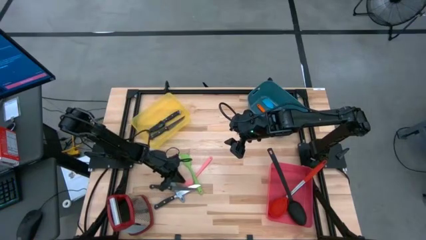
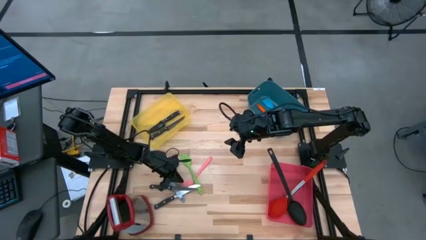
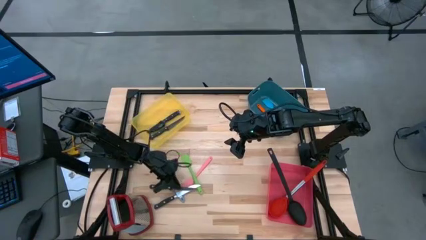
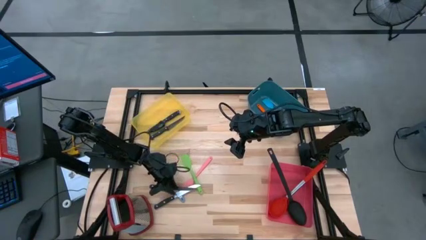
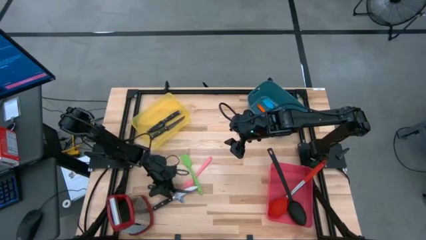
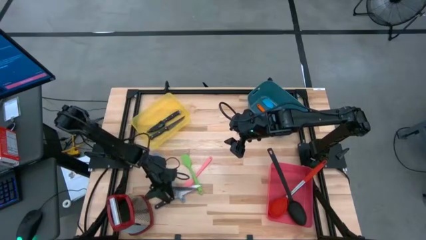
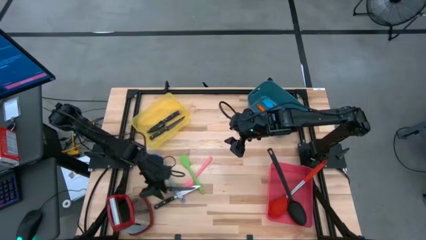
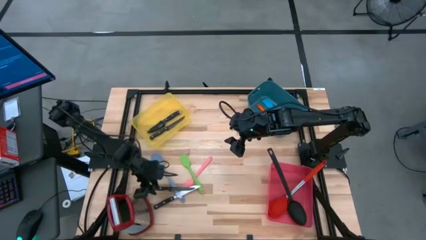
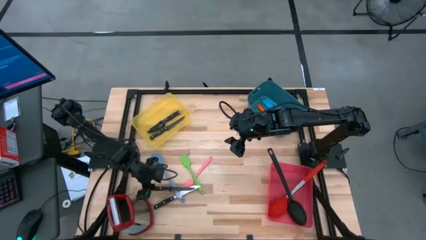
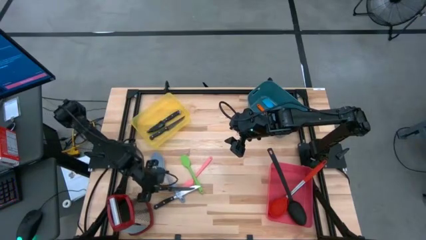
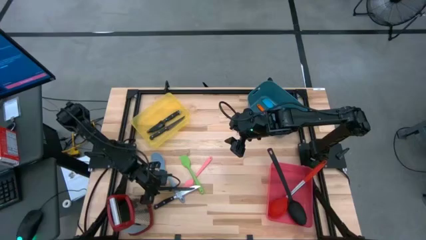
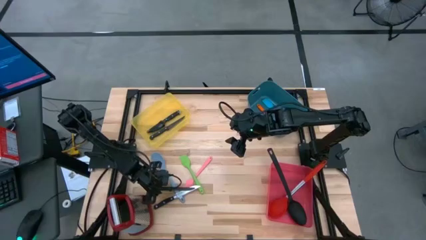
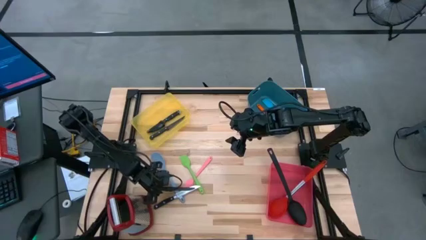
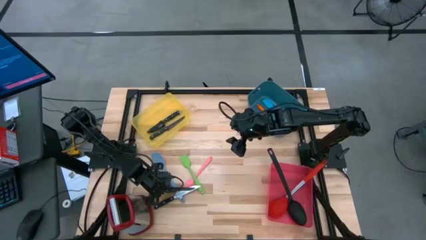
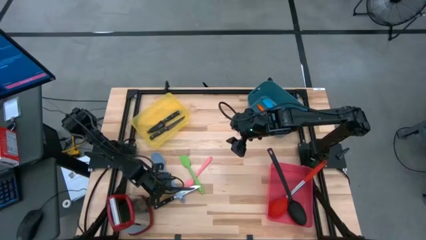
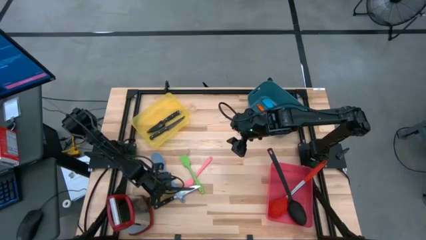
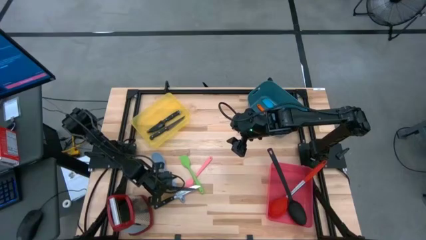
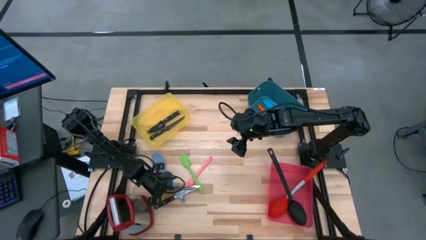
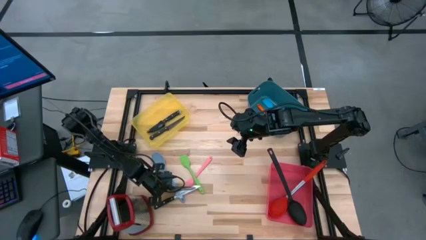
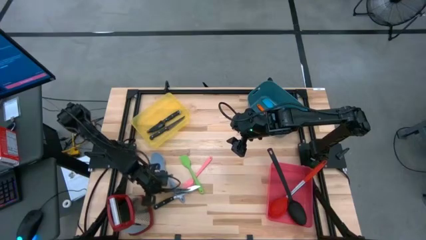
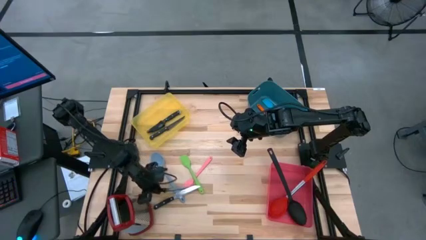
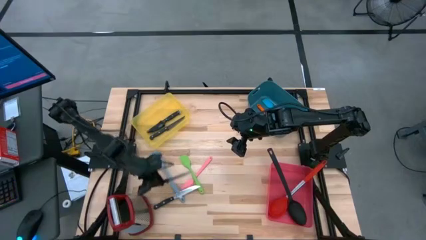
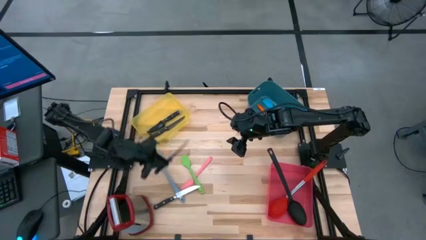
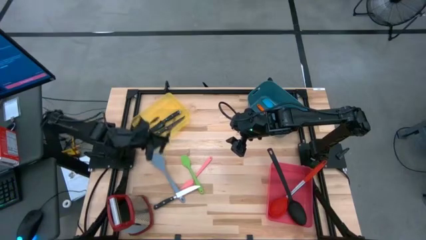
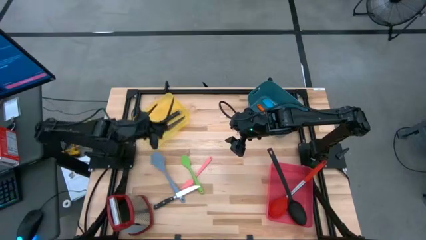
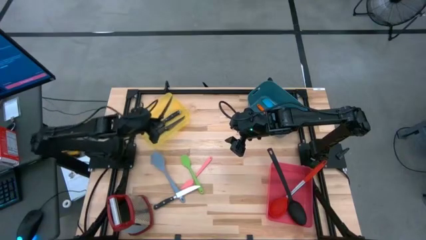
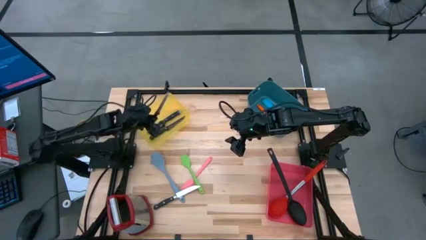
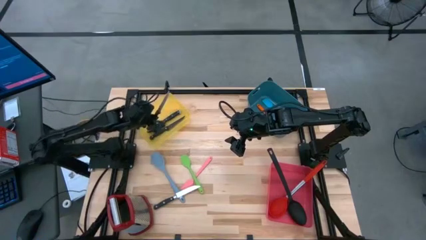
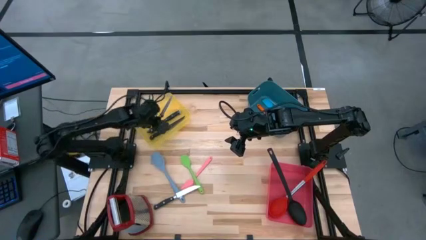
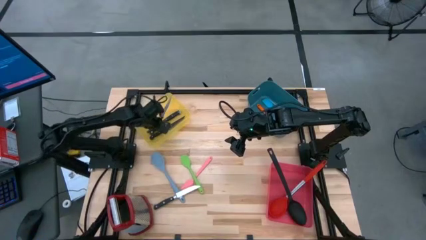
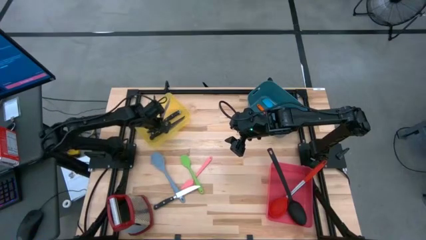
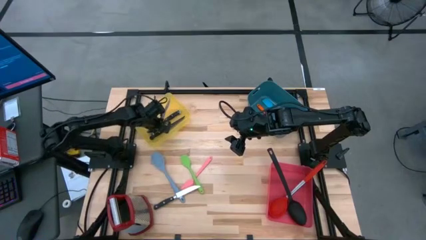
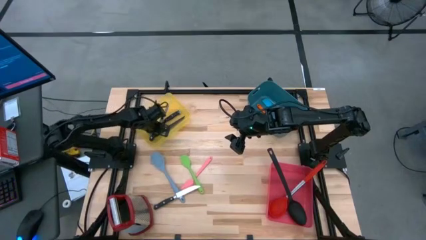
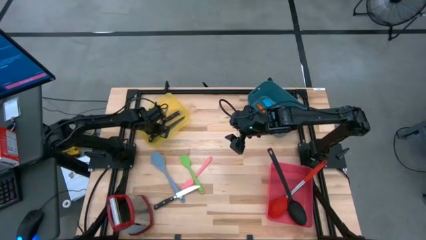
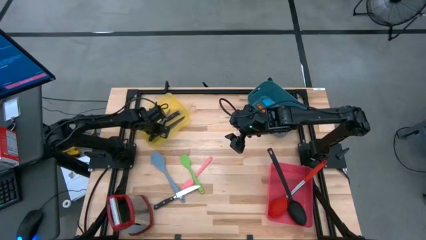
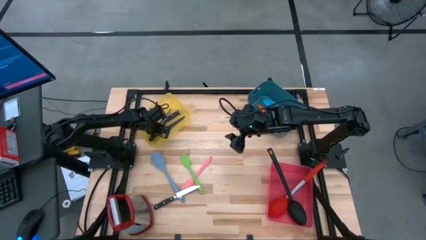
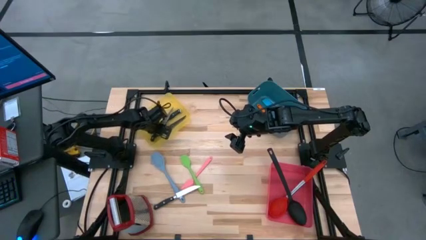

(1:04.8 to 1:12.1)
Task: Pick & Place Kitchen Items
Put the left silver knife into the yellow bin

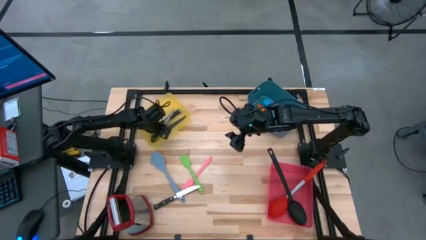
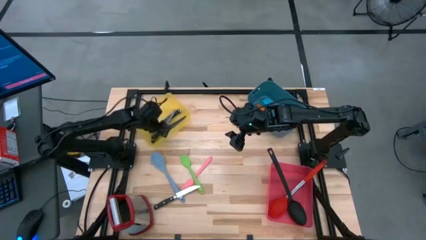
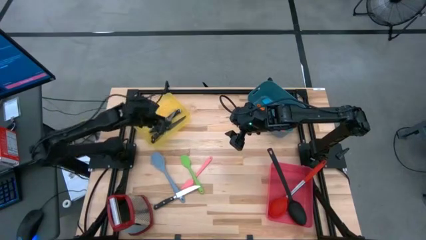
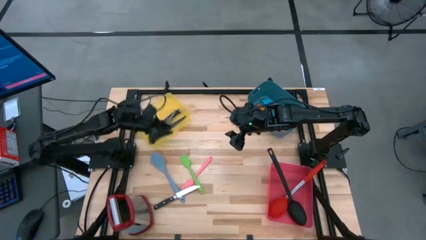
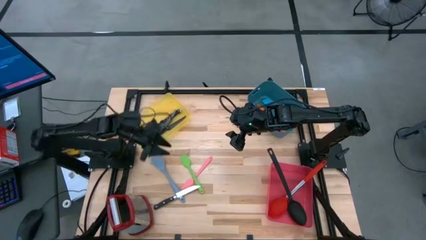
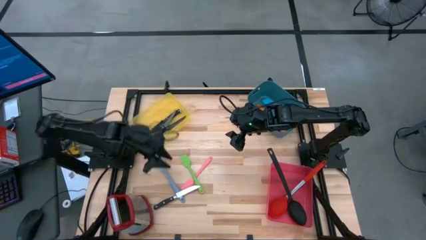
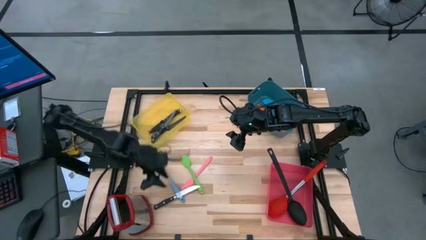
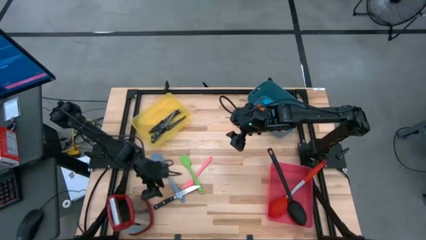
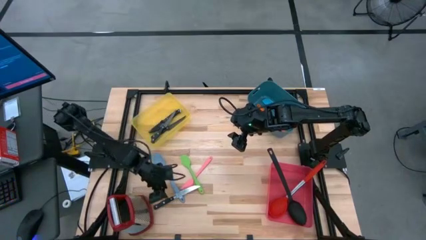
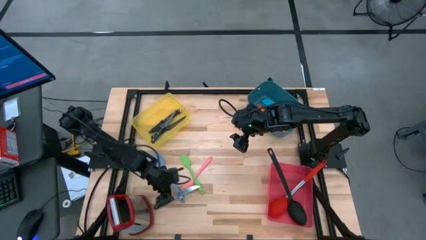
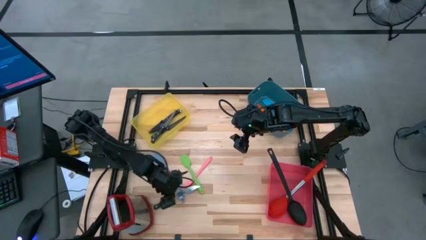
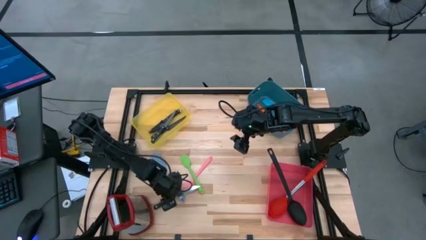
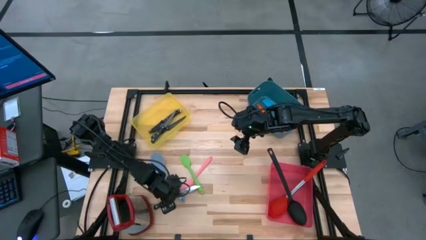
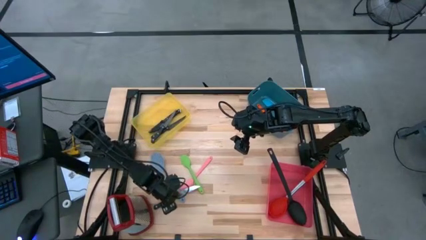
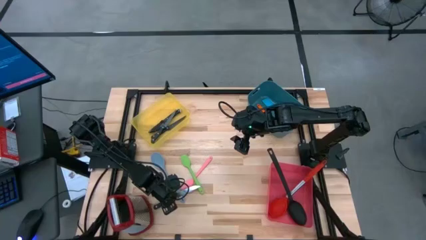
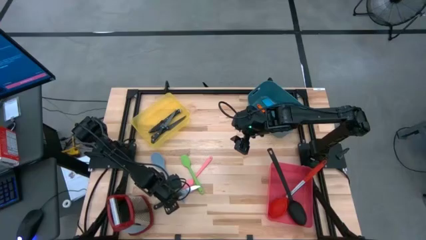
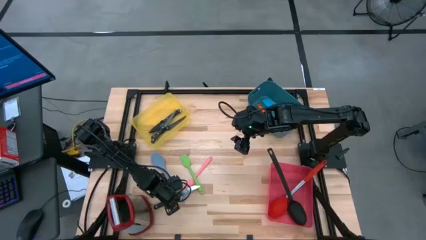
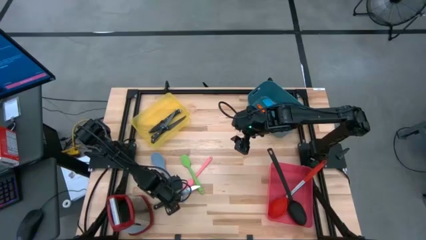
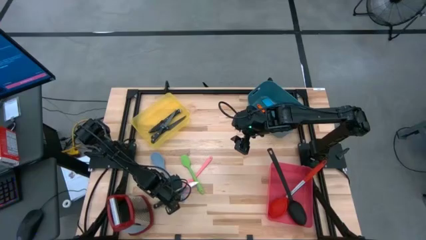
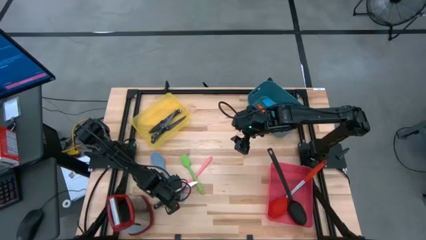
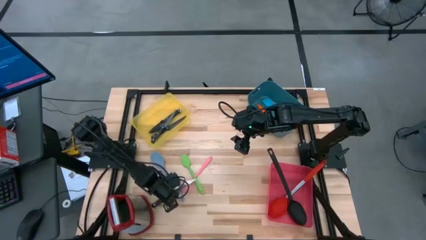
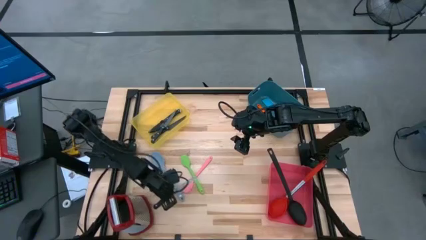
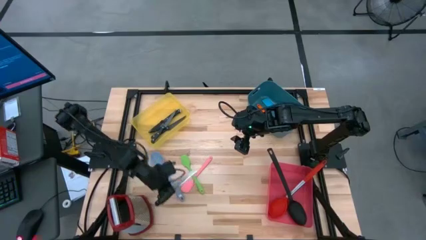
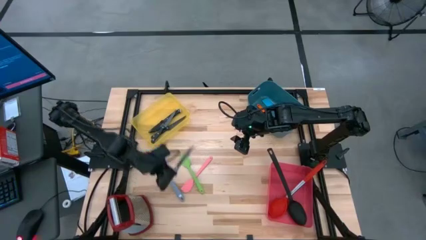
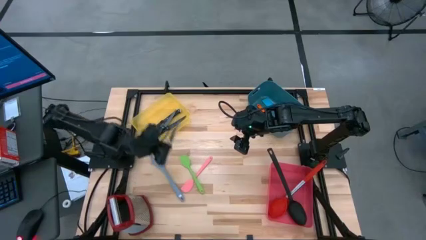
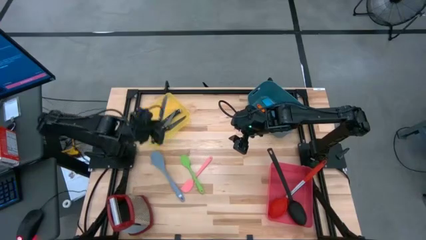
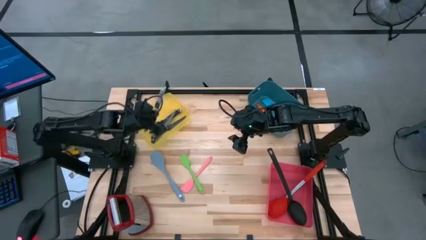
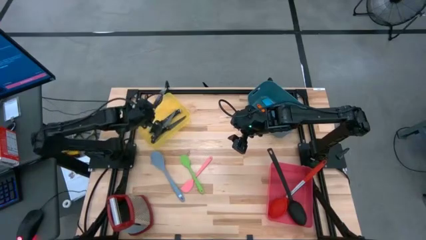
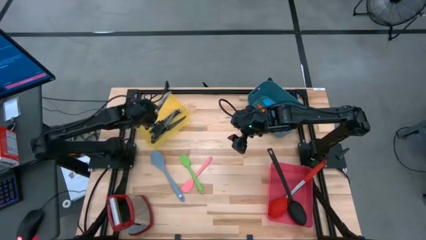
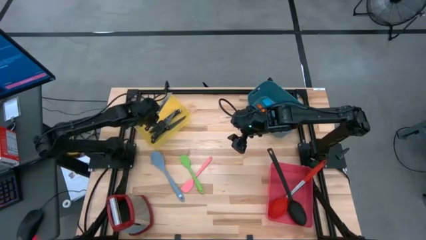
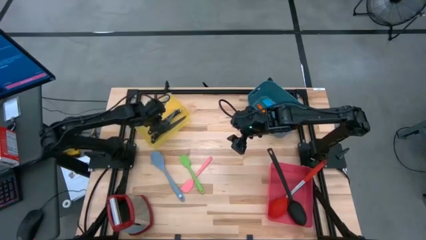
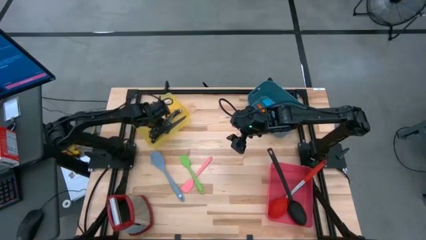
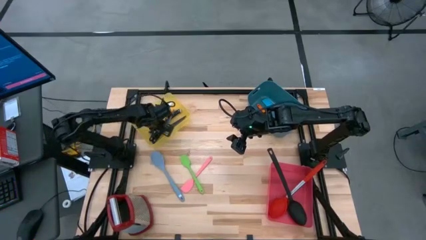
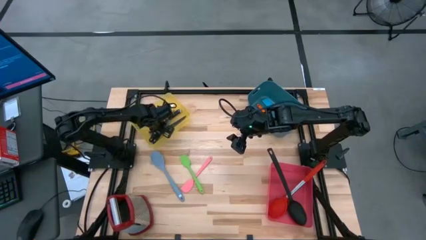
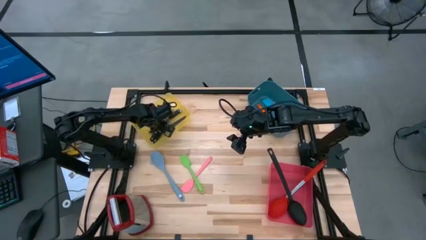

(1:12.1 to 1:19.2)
Put the silver knife into the yellow bin
